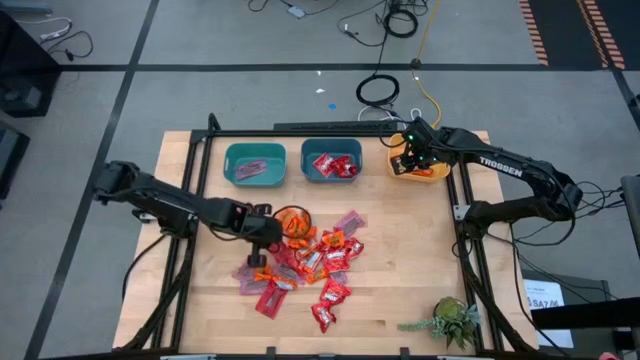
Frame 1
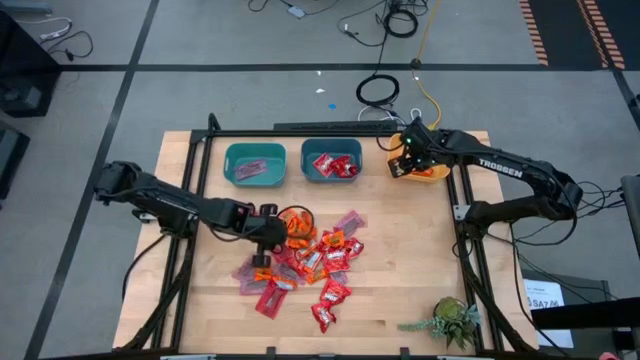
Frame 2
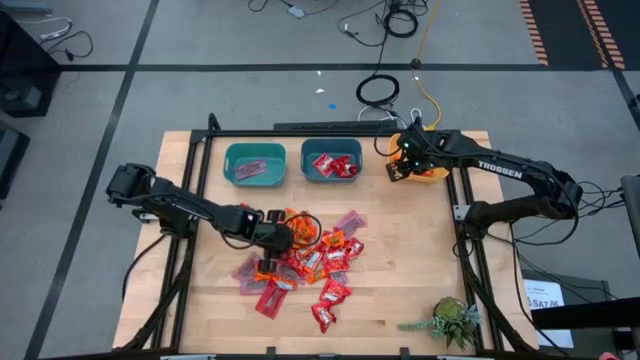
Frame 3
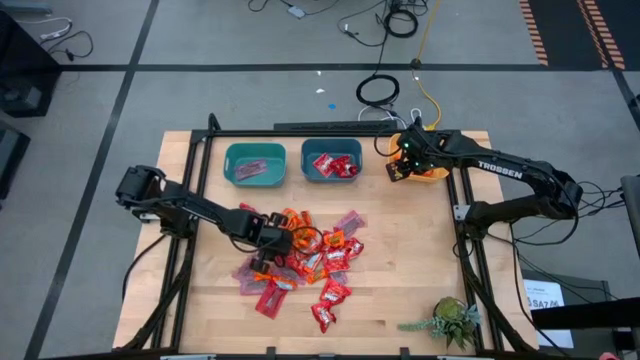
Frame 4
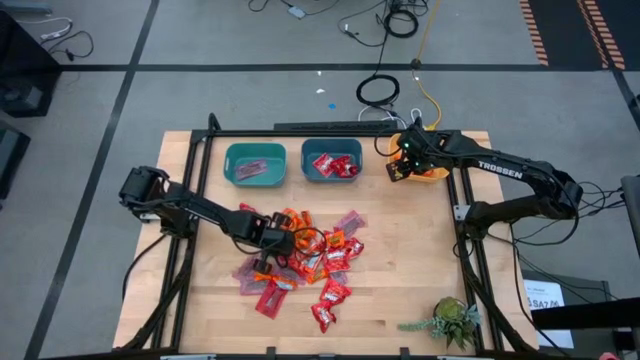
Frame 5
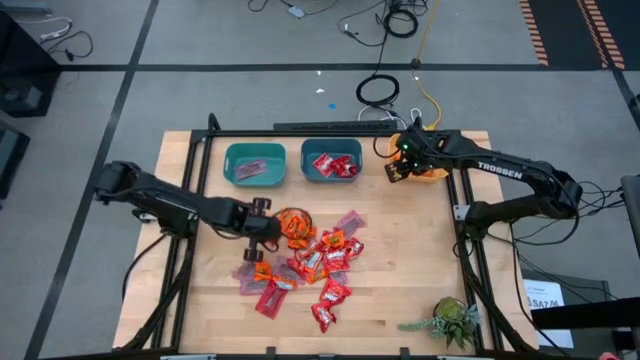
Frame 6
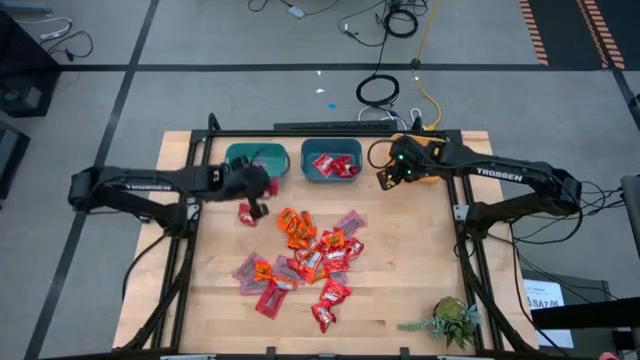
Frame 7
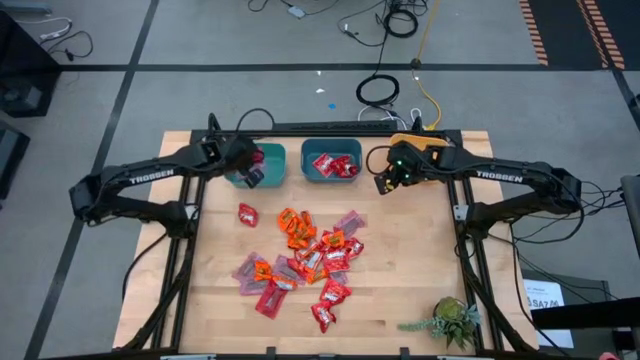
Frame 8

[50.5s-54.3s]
Task: Sort candy
Put the red chocolate into the green bin

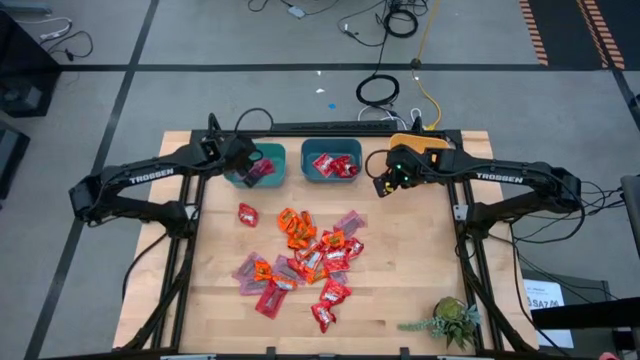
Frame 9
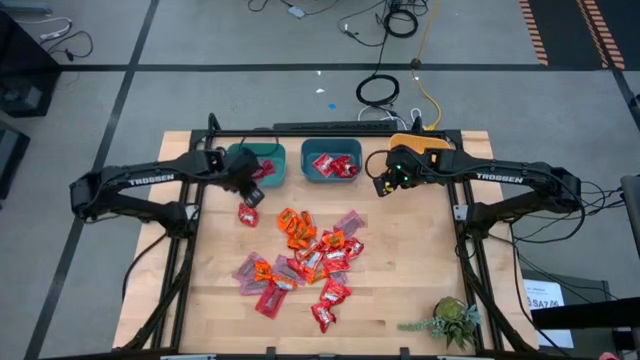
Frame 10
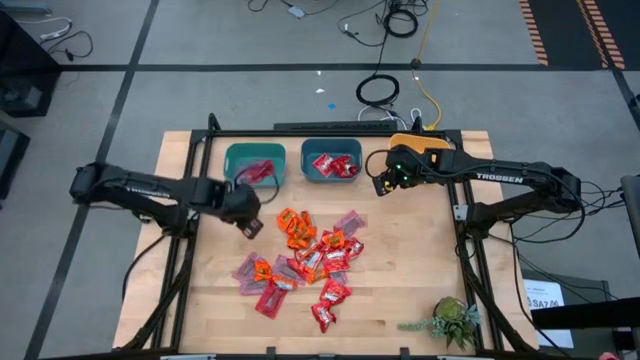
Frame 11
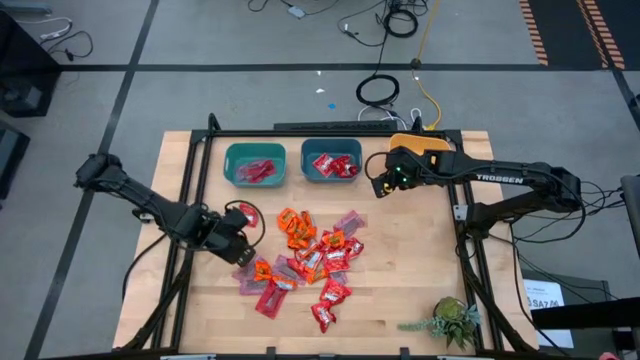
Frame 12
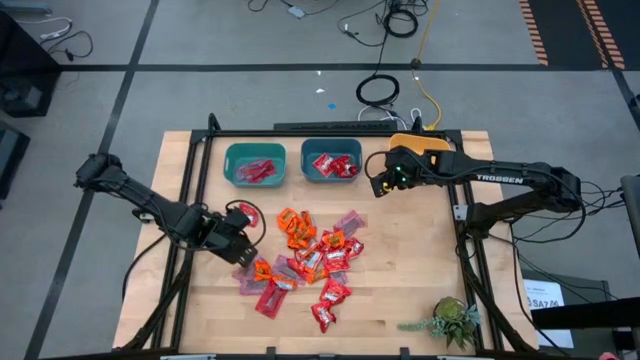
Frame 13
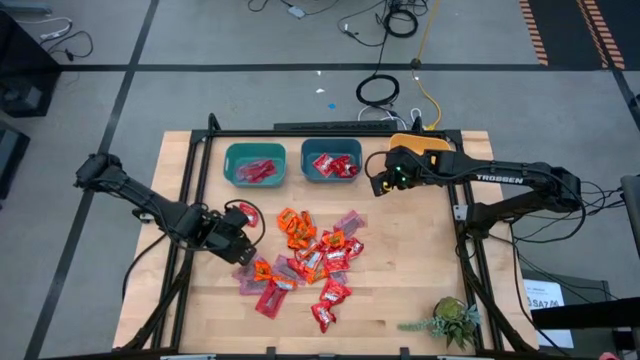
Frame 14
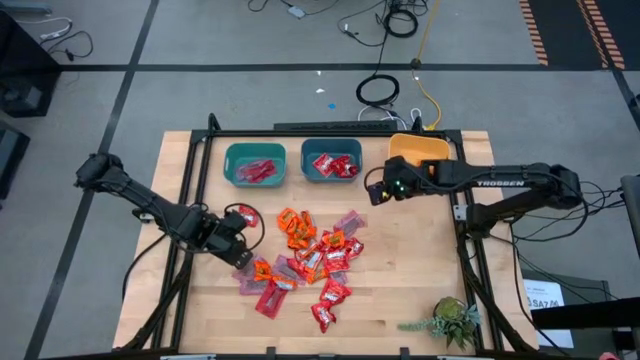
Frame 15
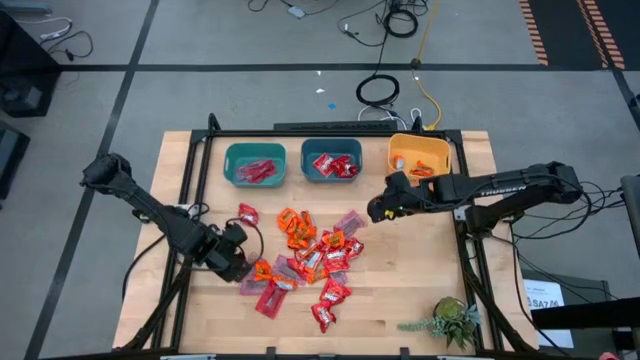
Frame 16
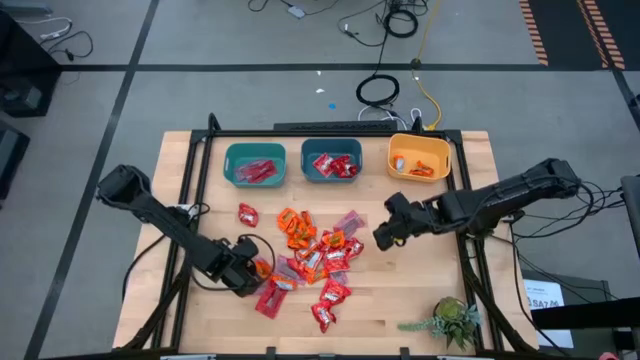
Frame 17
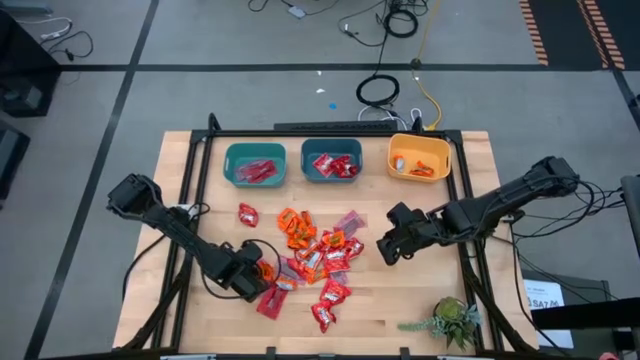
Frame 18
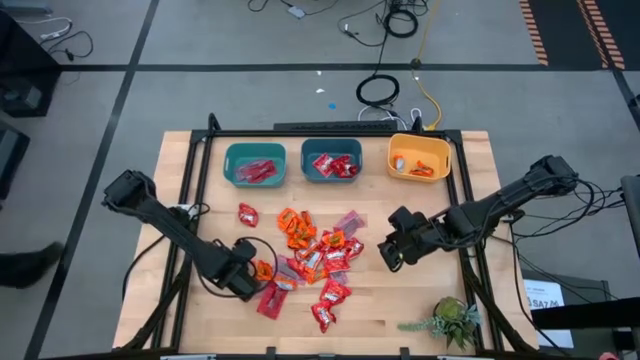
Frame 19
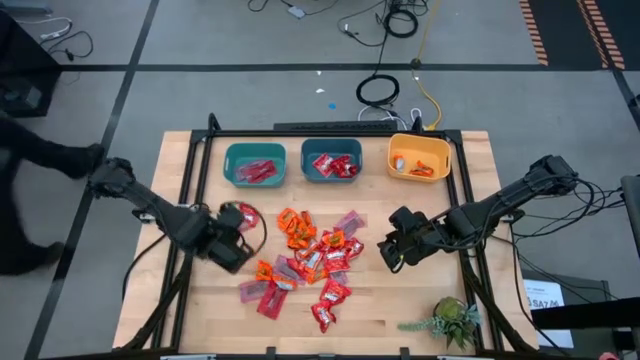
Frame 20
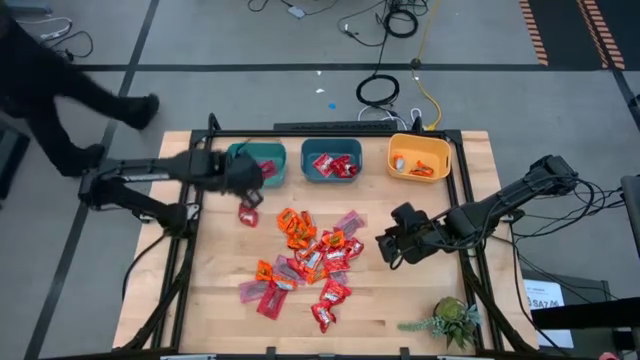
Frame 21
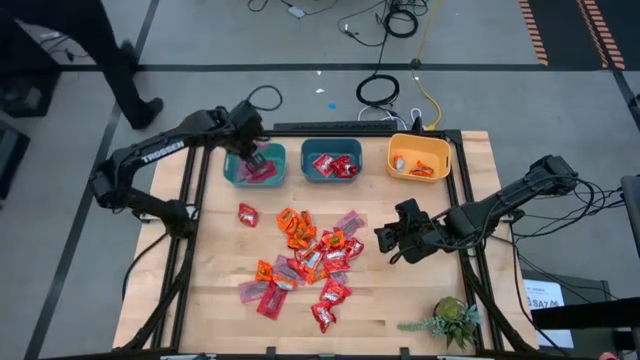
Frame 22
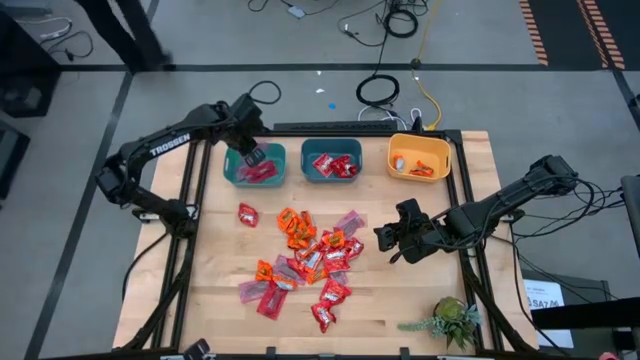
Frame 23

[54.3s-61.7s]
Put the red chocolate into the green bin

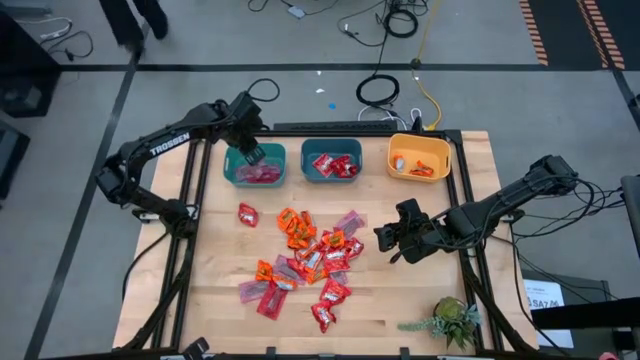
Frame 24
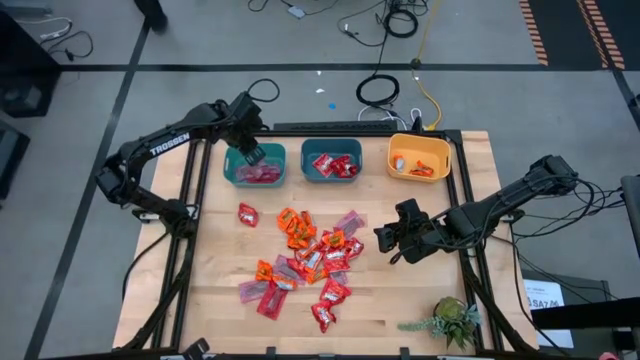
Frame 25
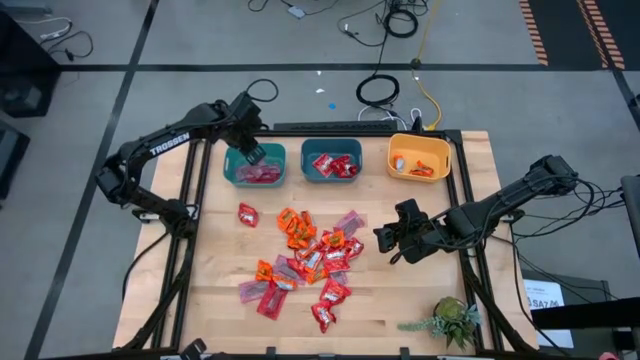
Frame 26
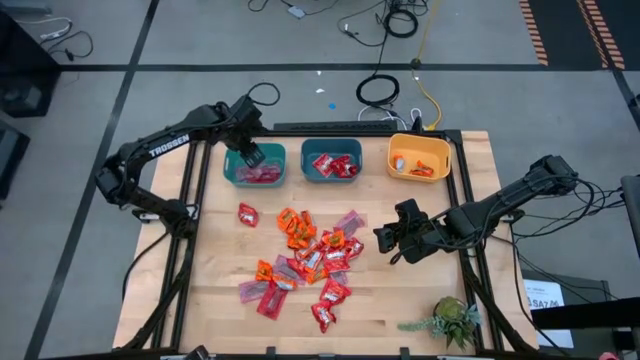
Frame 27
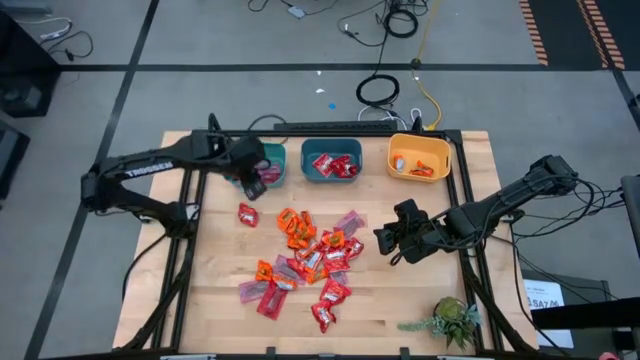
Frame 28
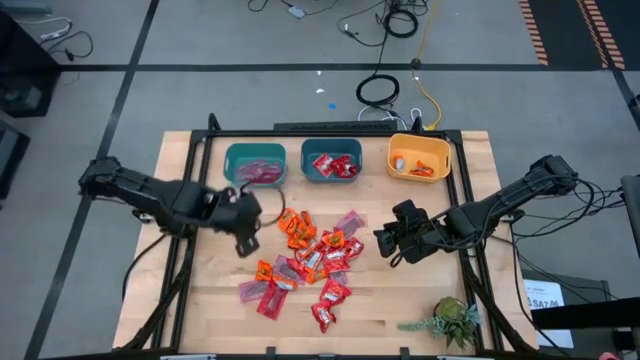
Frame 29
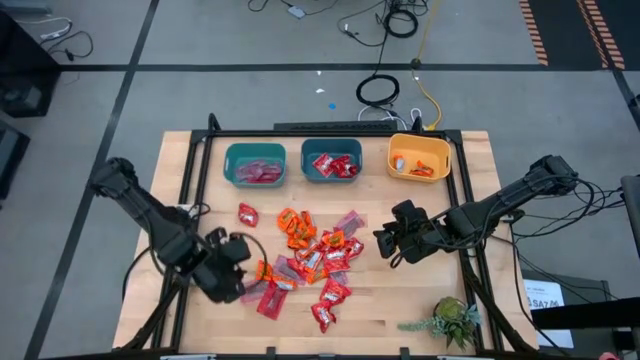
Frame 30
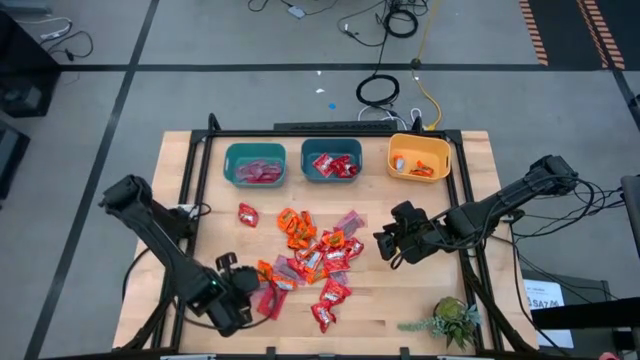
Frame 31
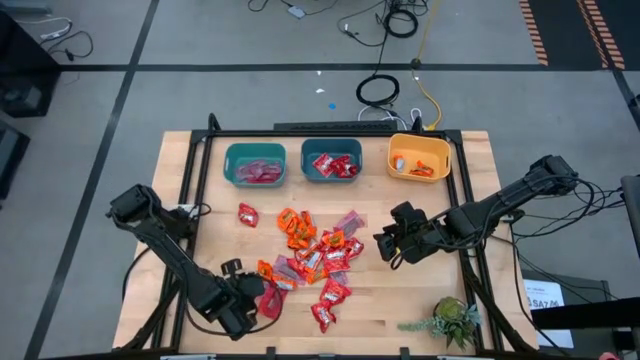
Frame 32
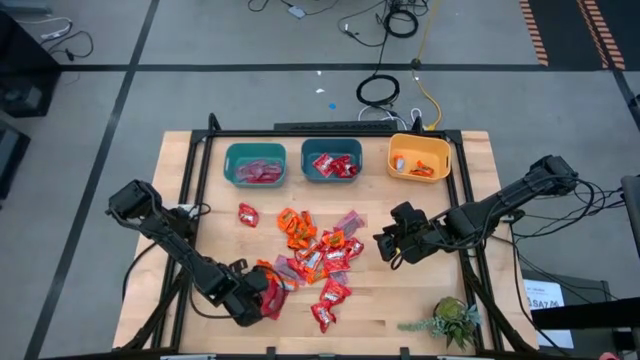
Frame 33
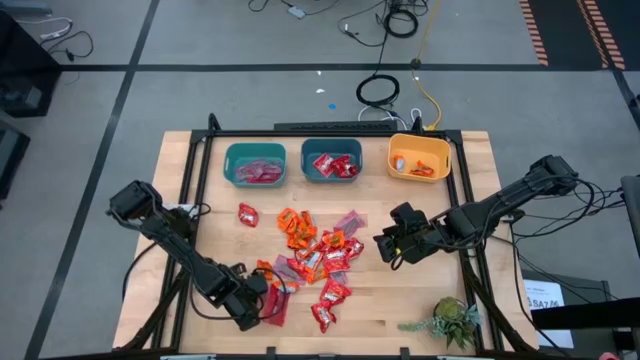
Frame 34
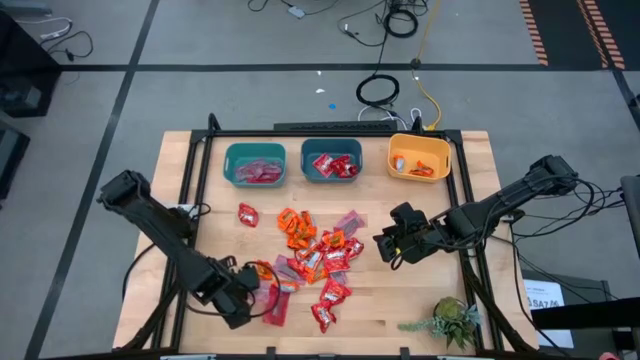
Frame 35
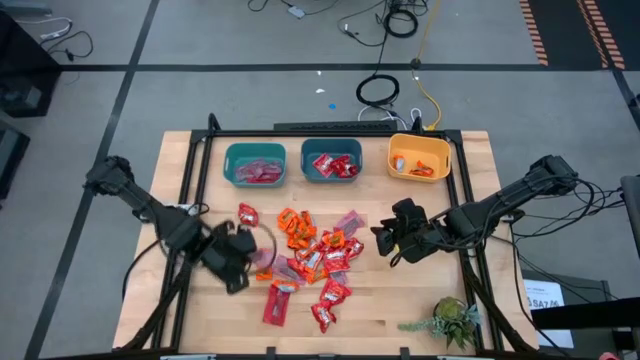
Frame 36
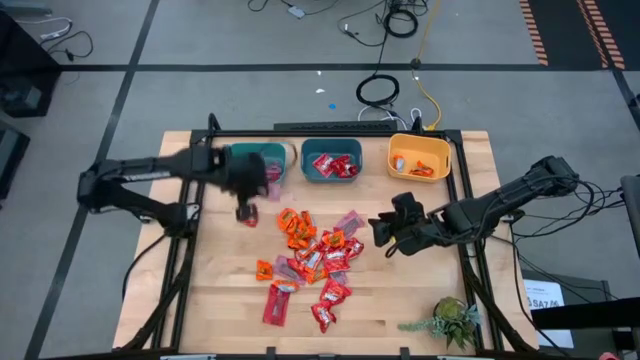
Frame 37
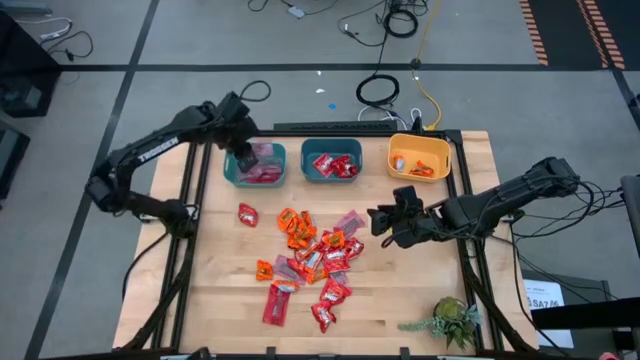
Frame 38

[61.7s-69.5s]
Put the red chocolate into the green bin

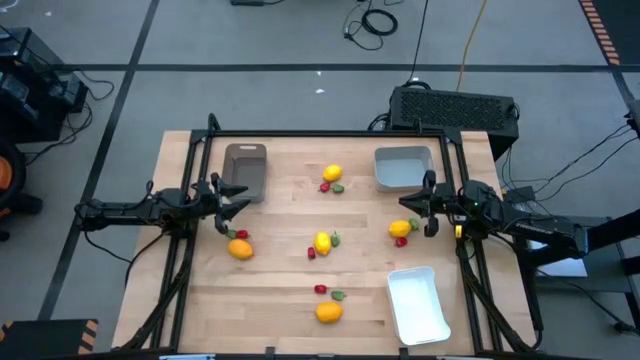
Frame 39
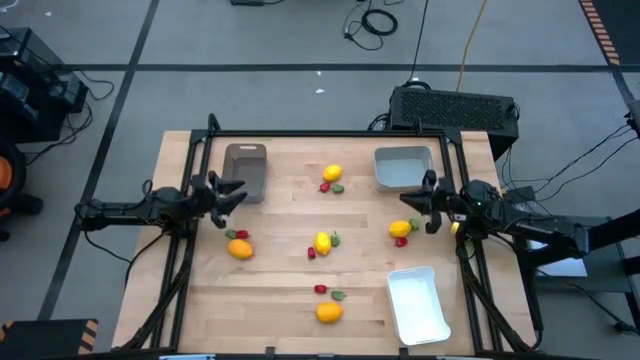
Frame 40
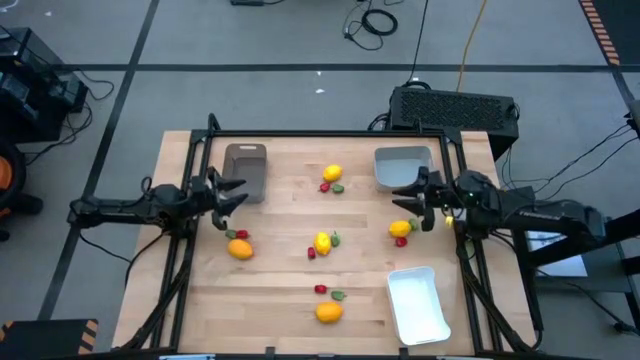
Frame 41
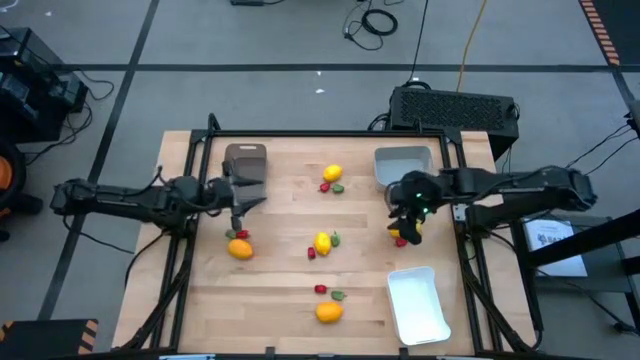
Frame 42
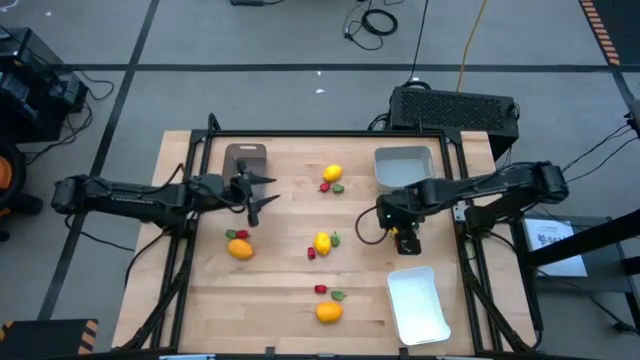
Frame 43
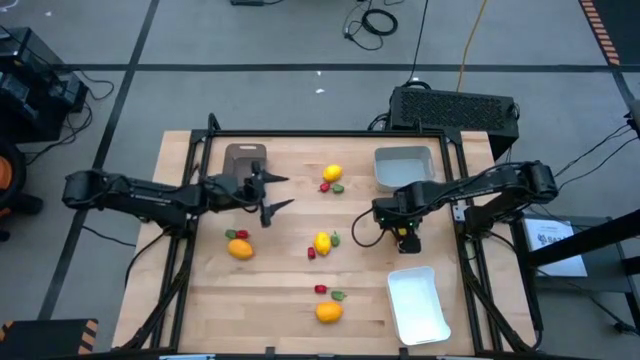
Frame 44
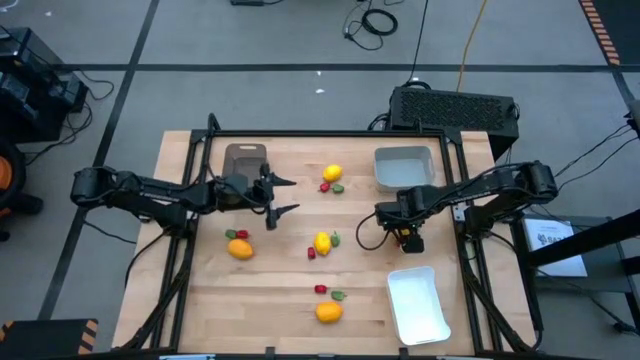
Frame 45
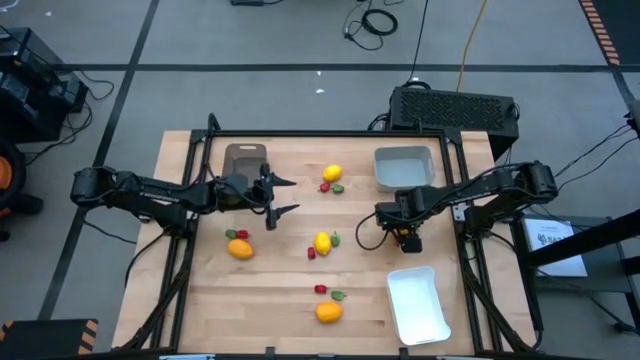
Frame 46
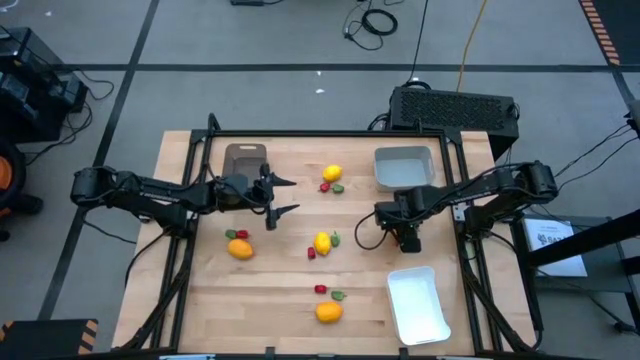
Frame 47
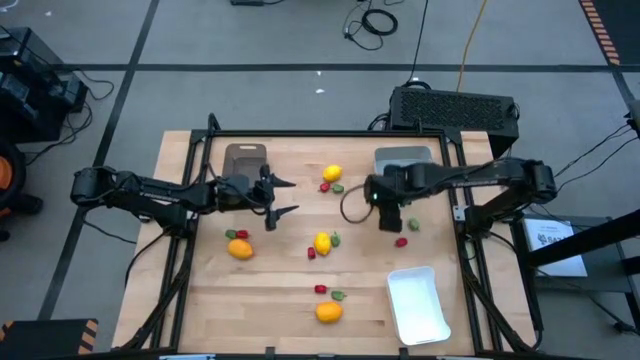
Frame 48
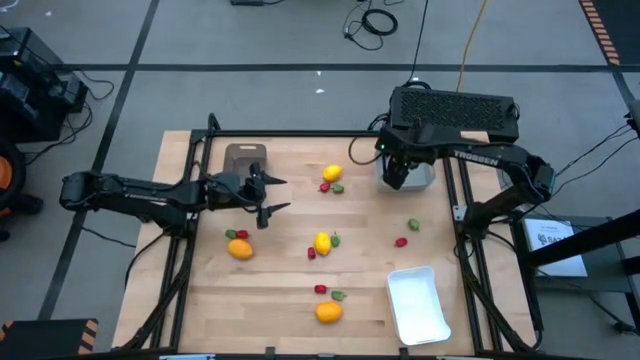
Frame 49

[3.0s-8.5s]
Task: Sort produce into baskets
Put the middle right yellow lemon into the gray bin
